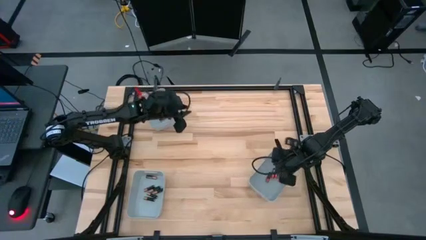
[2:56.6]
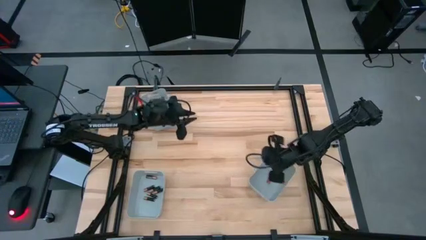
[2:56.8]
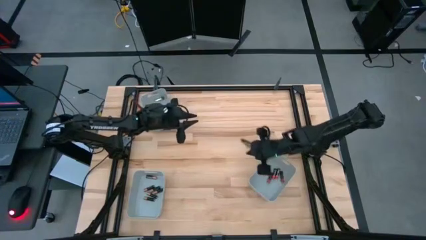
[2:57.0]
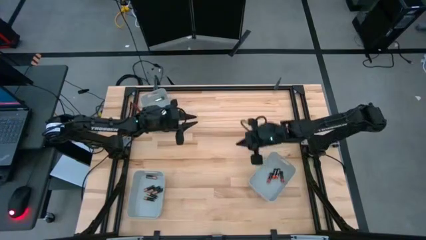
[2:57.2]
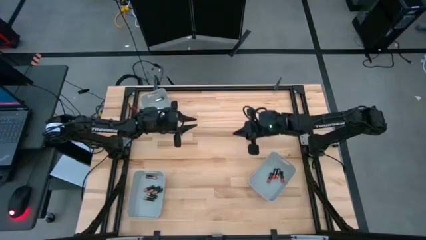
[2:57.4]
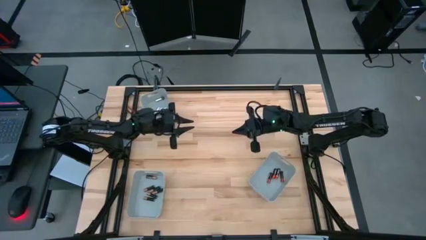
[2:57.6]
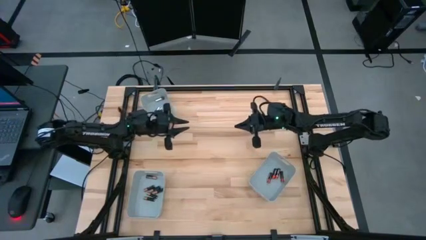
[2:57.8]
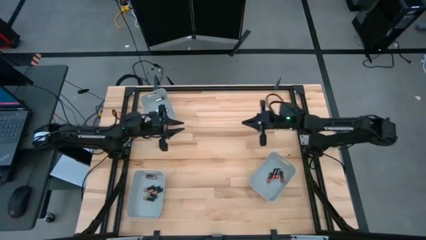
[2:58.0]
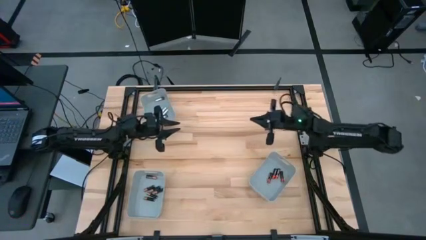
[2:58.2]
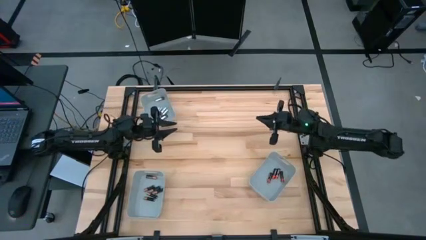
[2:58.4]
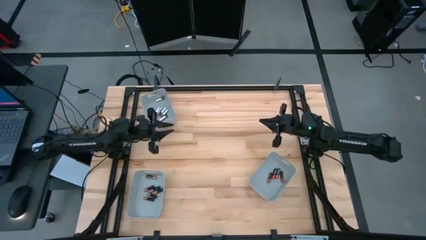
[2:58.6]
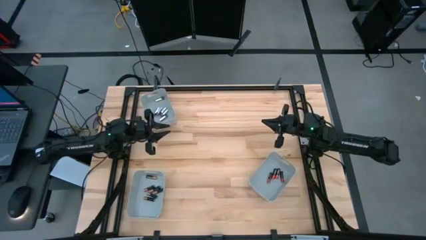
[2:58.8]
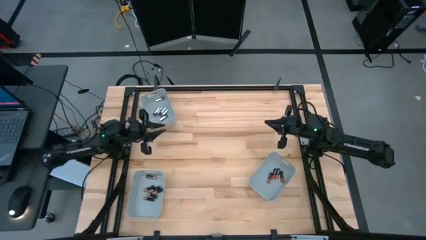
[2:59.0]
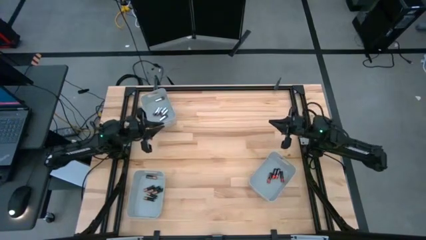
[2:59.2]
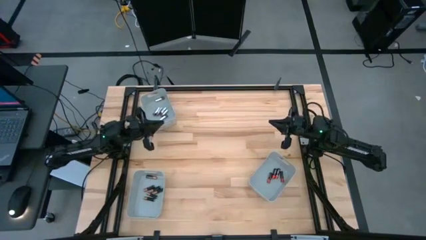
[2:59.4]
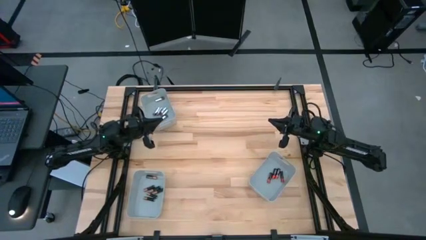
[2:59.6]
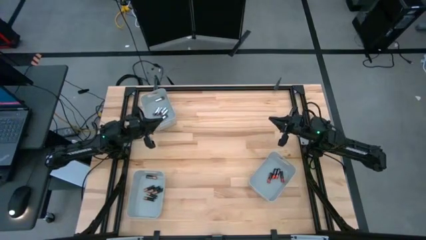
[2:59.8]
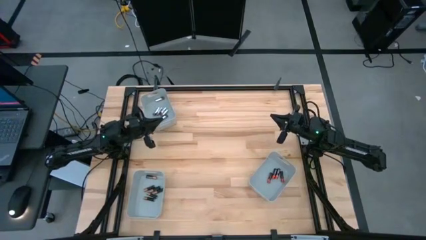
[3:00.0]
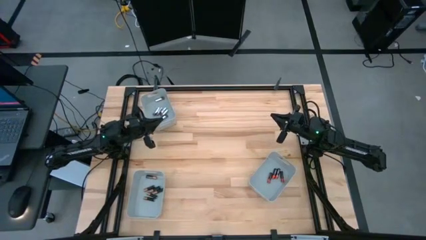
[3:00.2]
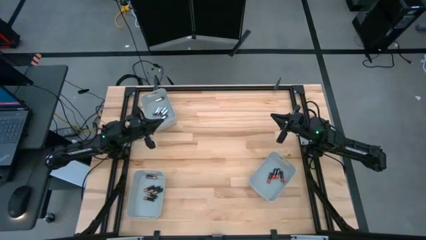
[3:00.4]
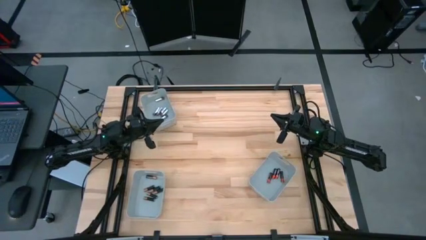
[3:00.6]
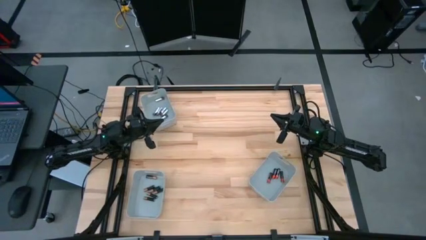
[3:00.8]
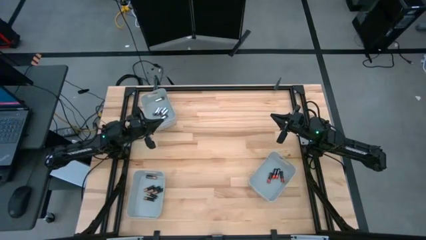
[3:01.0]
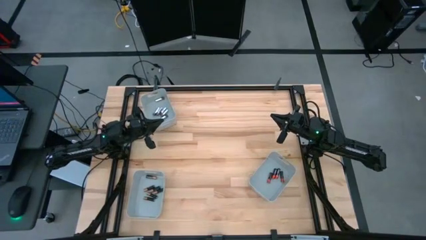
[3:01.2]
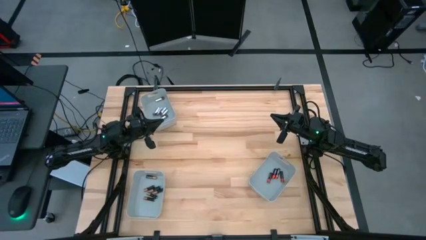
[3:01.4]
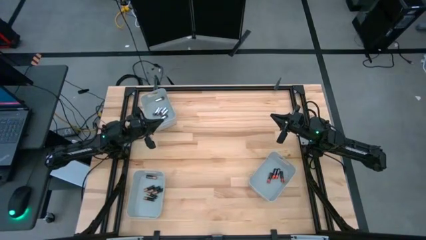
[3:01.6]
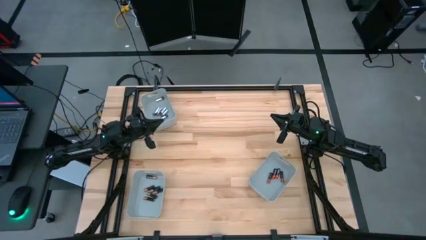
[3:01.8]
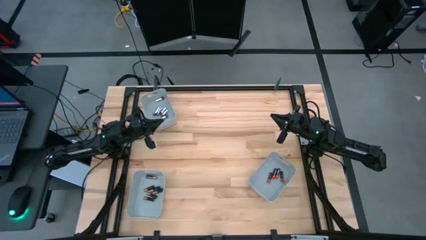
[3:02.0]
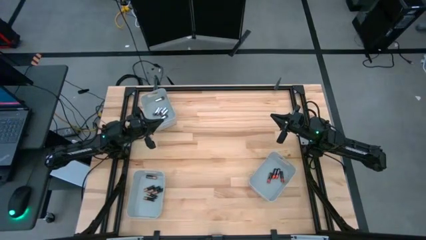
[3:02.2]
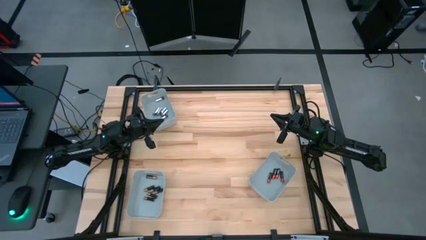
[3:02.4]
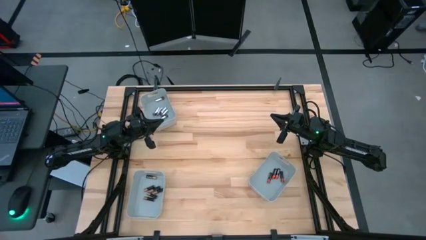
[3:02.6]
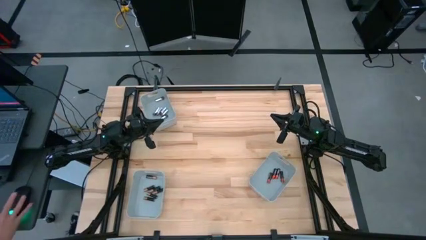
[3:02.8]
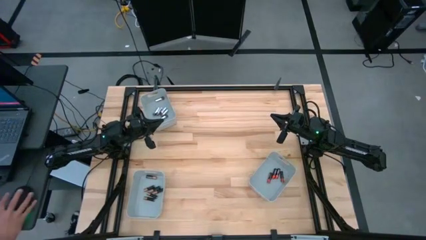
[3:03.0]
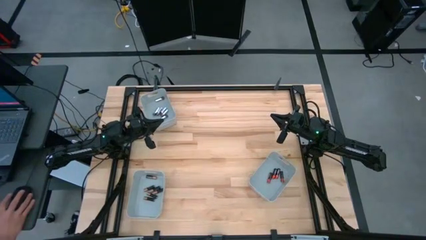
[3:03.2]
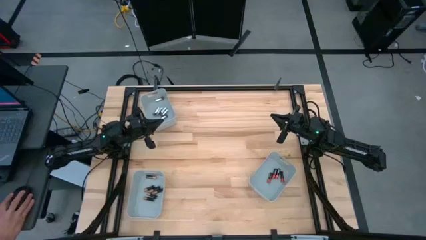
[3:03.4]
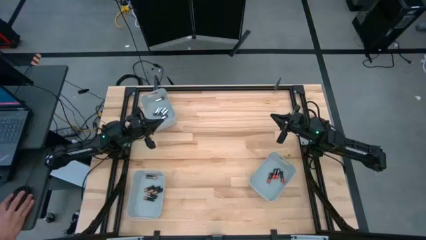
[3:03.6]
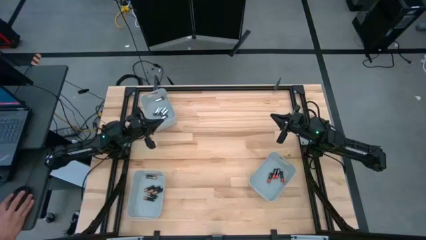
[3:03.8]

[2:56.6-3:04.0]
Task: Sort batteries
Return to Home Position

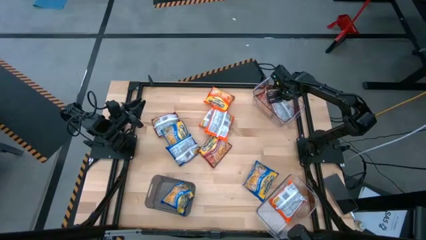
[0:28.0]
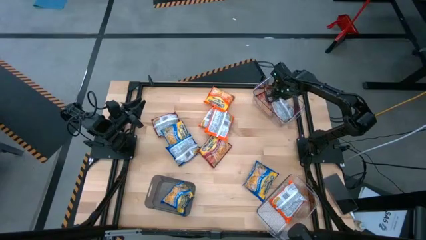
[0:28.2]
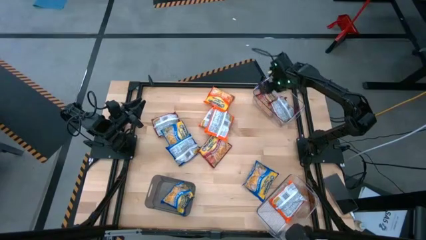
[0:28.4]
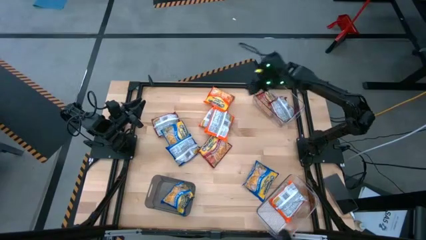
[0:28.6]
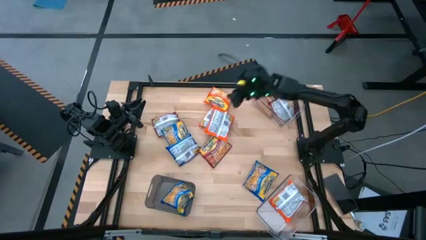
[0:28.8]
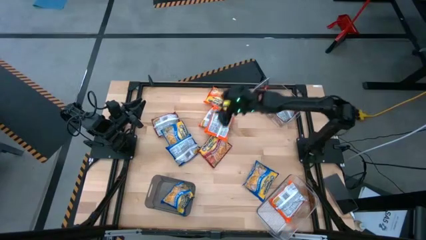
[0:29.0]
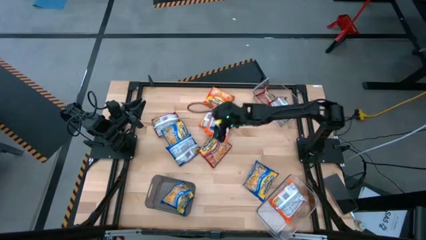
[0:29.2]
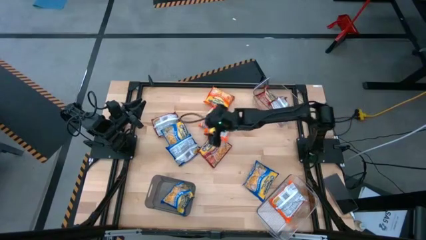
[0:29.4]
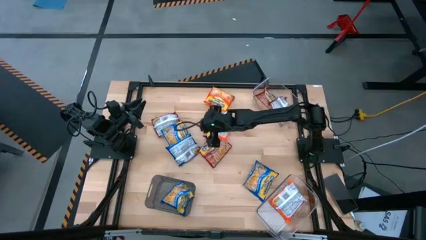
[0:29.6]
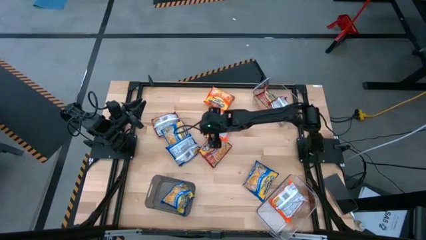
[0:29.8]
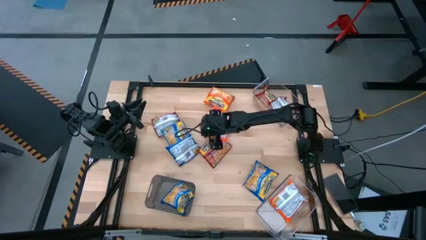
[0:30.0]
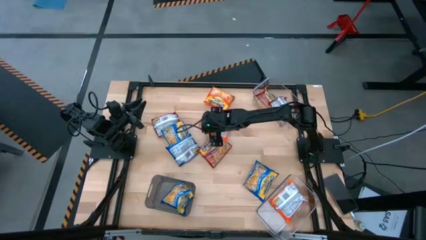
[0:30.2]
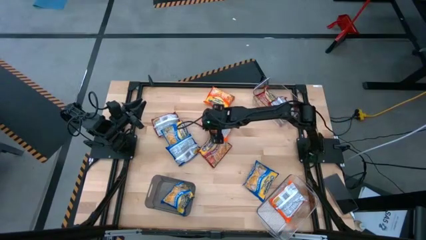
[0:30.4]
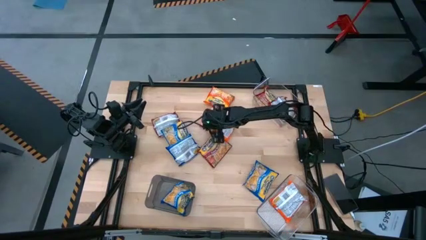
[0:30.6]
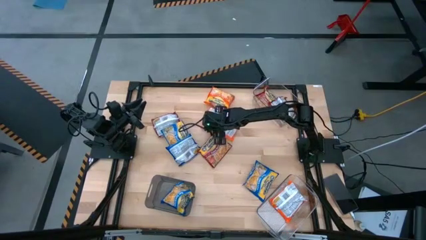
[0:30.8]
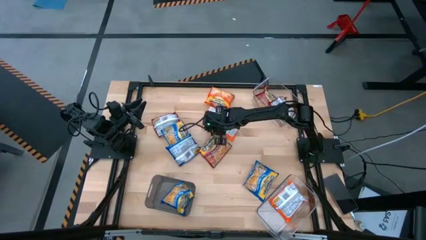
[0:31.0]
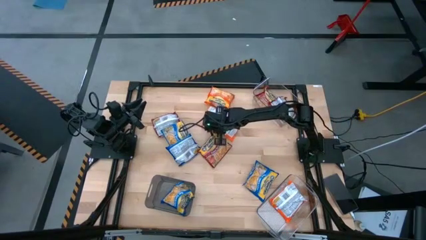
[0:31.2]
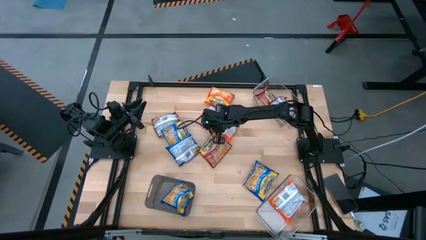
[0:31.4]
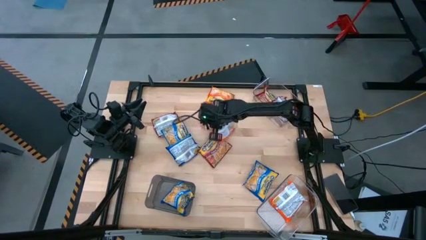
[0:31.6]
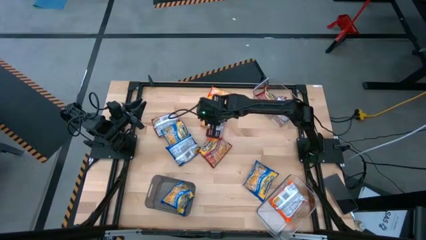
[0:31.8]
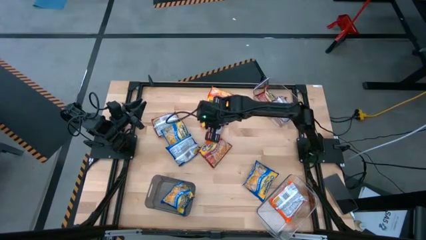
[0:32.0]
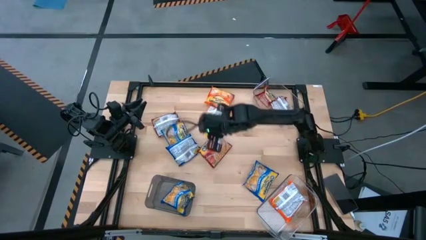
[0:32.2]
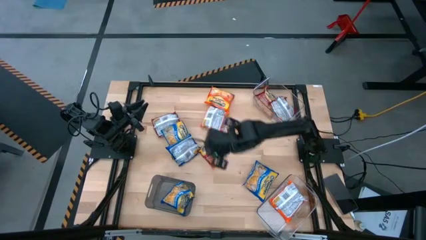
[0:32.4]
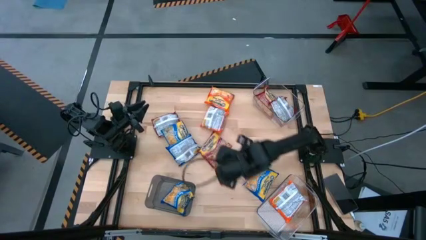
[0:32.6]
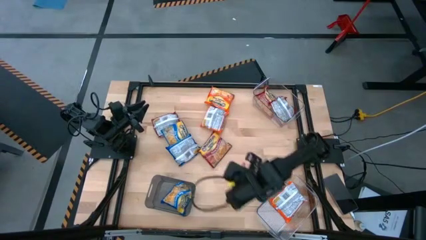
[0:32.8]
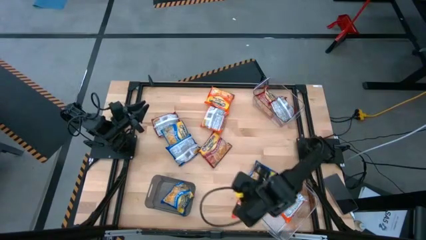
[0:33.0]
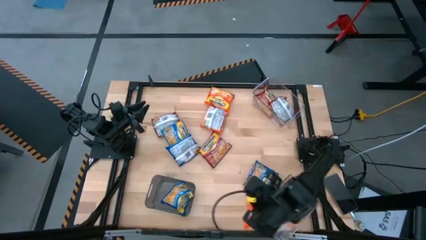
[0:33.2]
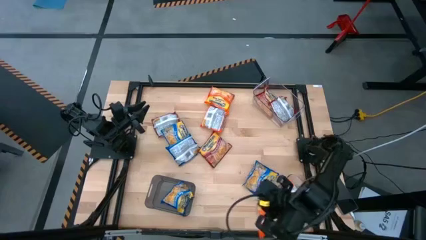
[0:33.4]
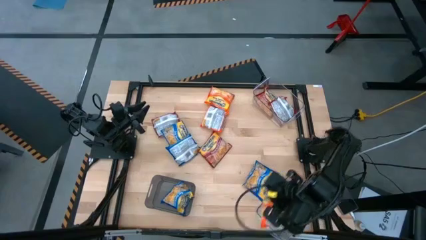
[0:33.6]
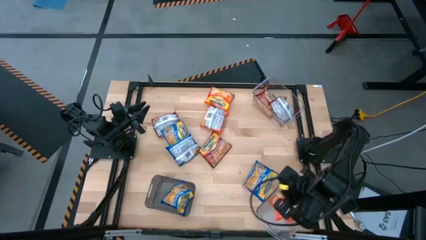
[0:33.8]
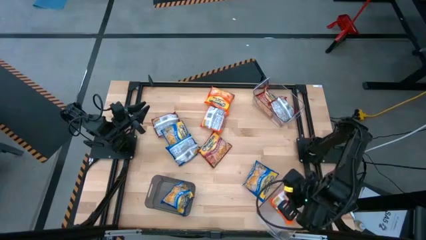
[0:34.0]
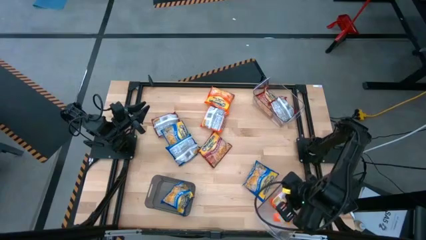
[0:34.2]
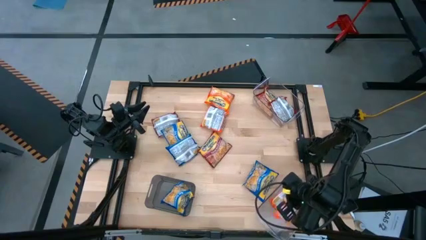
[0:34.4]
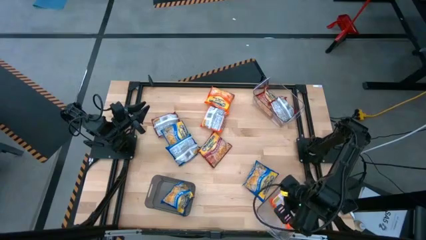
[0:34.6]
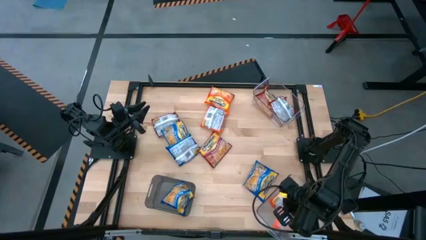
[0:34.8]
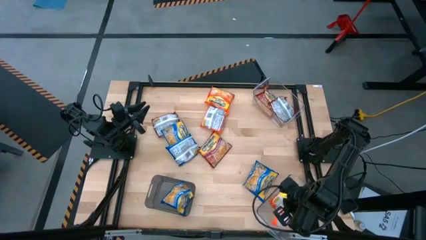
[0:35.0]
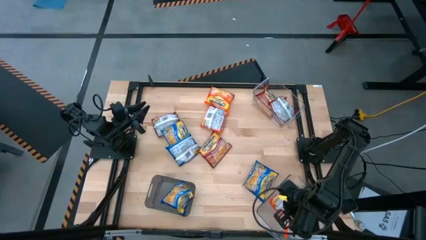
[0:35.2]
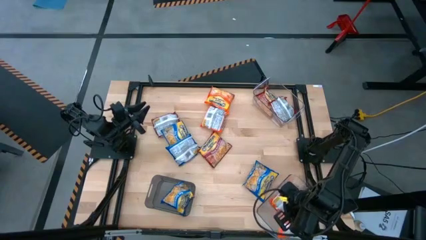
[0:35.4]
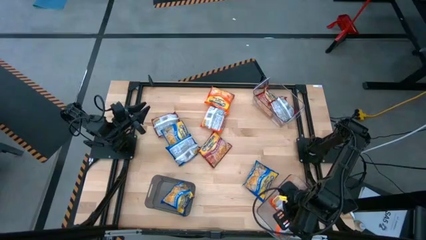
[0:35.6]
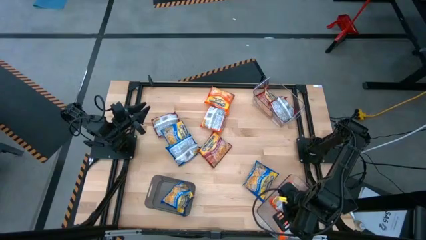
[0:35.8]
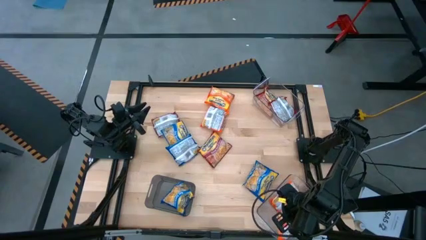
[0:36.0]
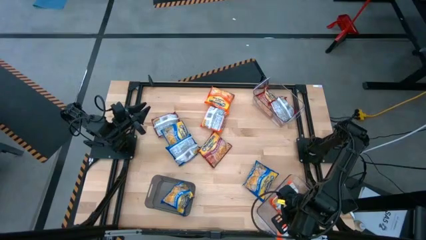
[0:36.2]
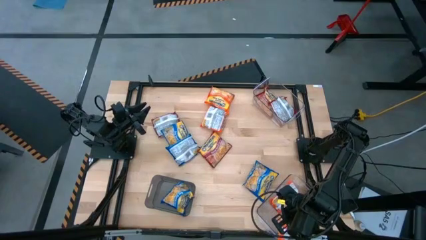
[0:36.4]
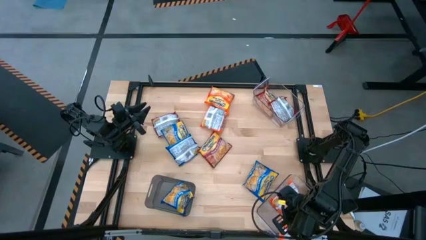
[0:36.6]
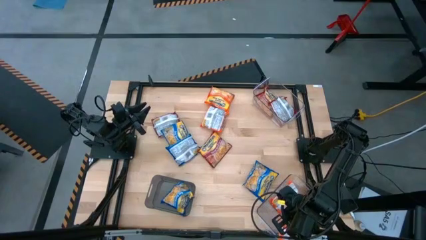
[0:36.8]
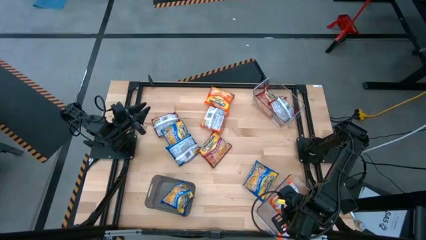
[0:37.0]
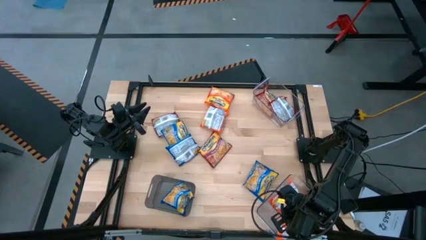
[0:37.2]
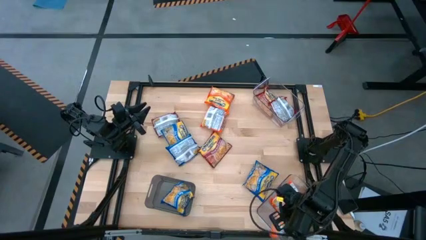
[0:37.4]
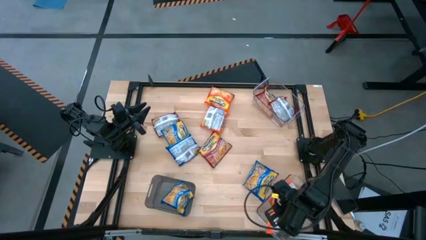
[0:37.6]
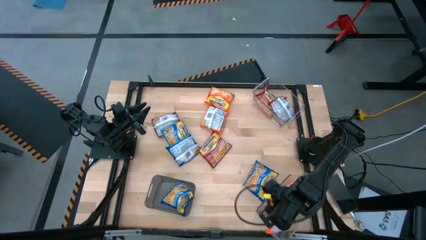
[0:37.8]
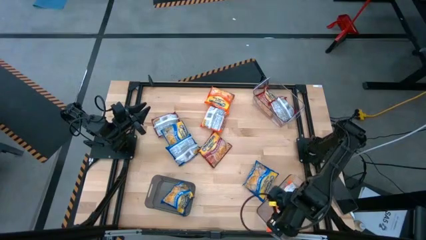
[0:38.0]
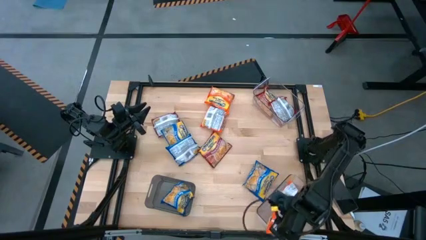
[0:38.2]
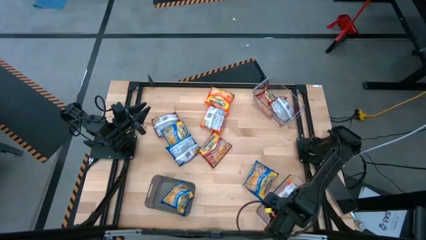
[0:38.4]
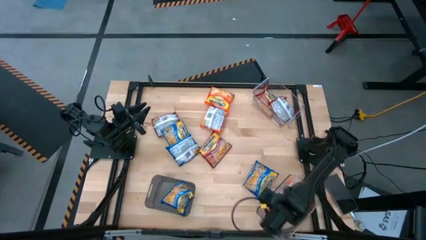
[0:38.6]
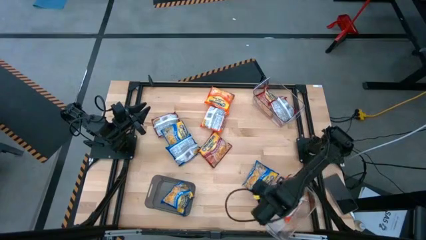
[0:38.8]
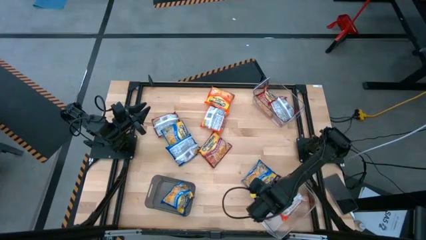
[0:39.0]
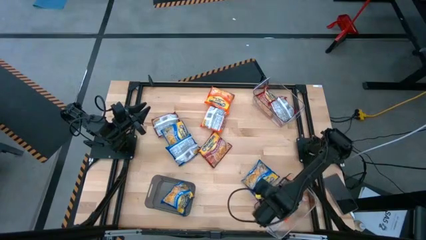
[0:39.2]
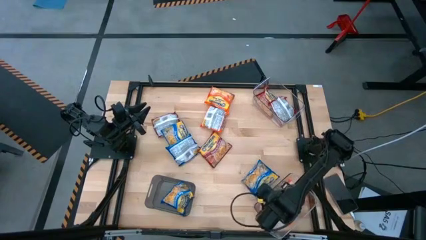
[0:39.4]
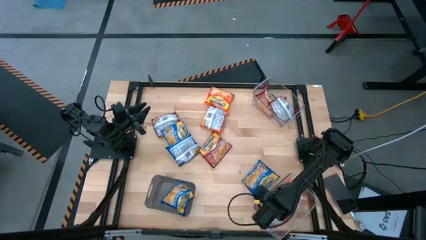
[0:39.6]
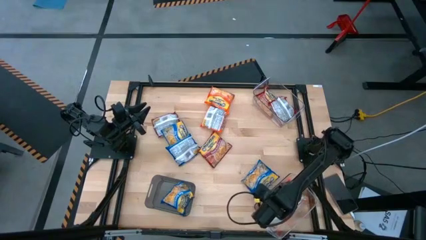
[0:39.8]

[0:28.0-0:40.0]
Task: Sort Maruchan noodles
Put the orange noodle pack into the bottom transparent bin
